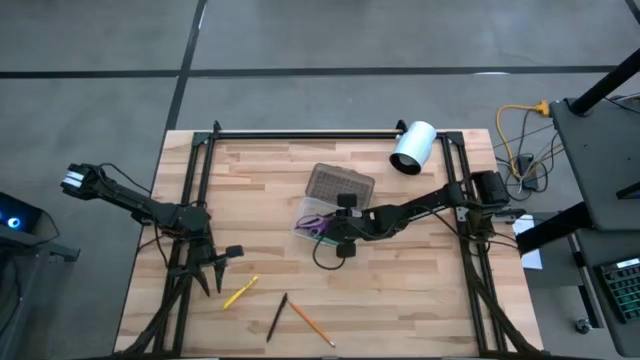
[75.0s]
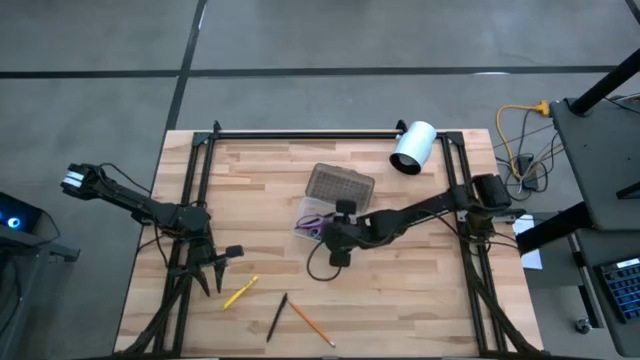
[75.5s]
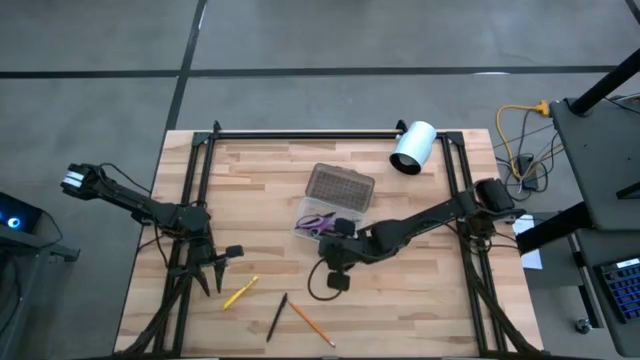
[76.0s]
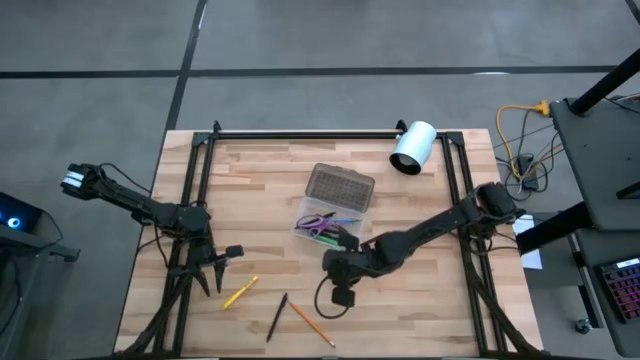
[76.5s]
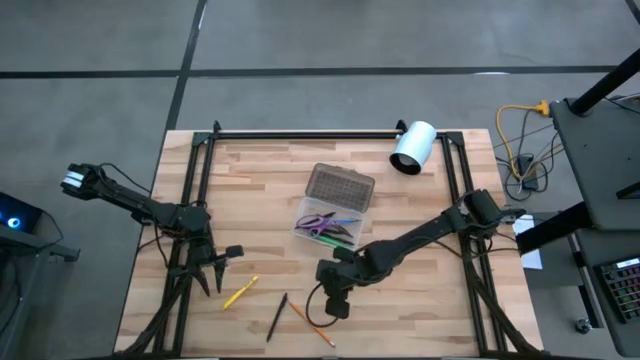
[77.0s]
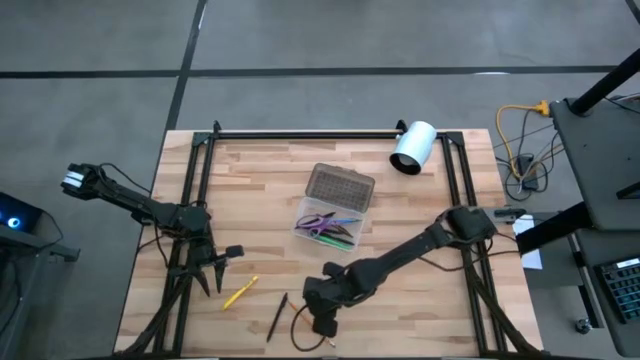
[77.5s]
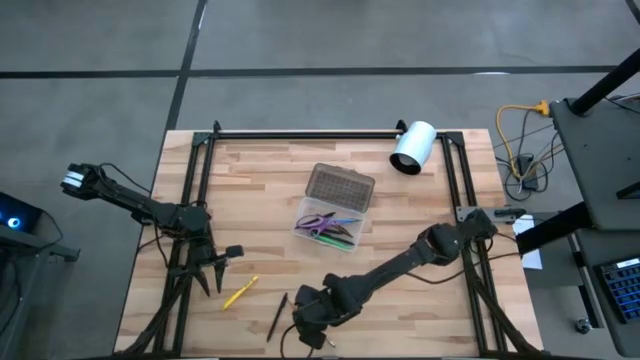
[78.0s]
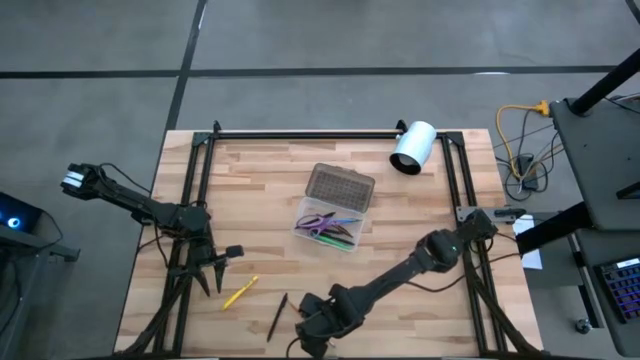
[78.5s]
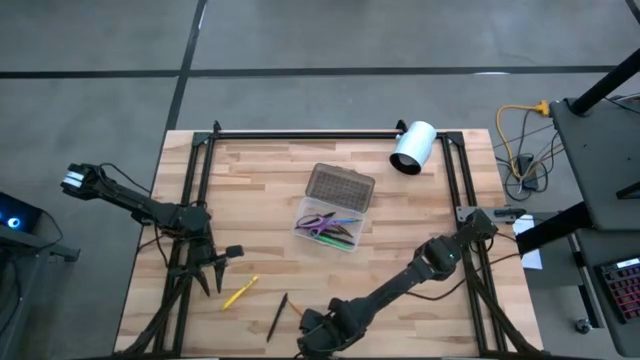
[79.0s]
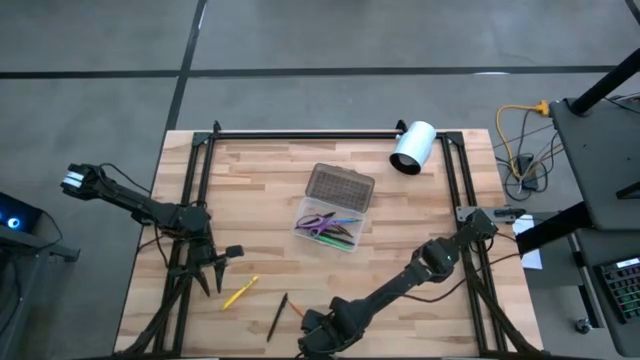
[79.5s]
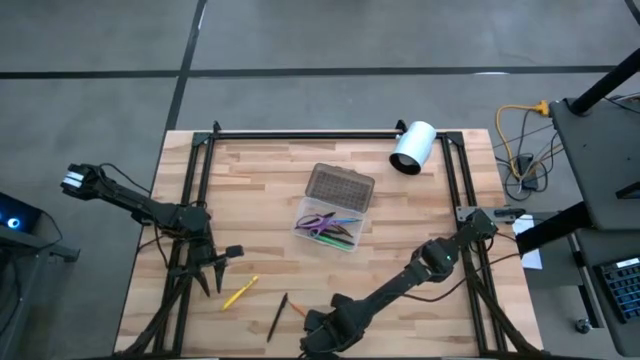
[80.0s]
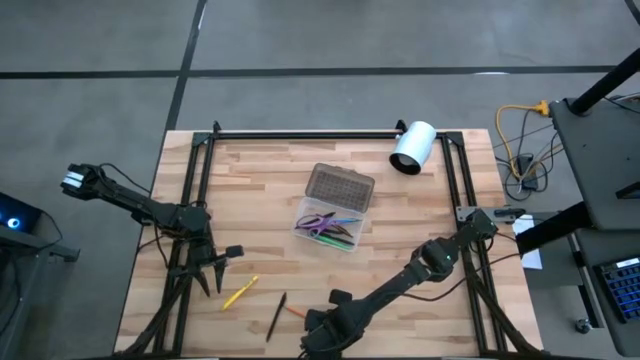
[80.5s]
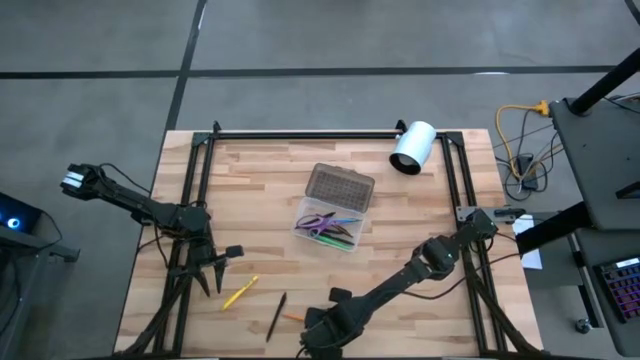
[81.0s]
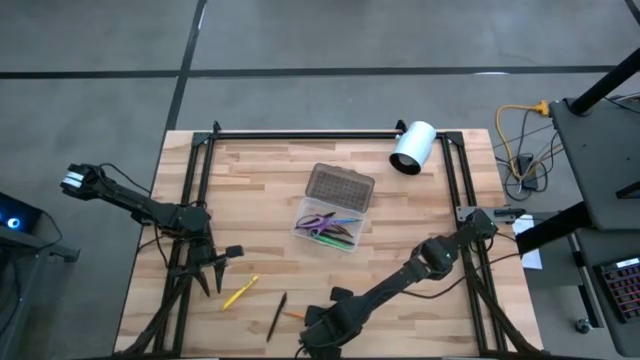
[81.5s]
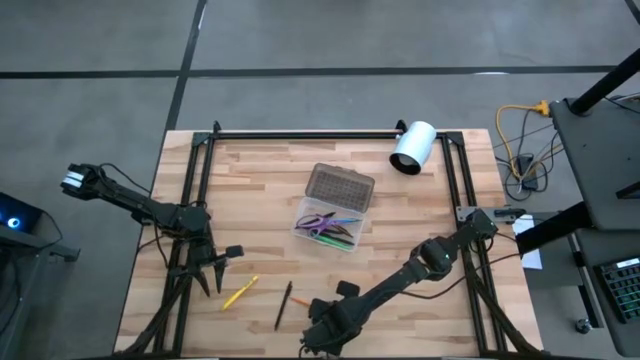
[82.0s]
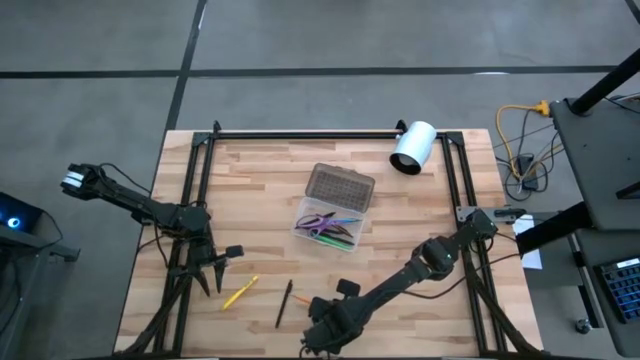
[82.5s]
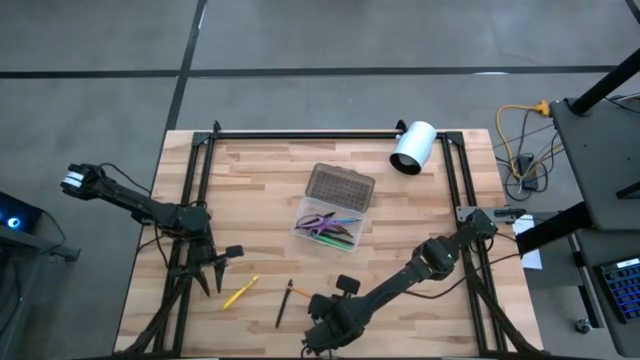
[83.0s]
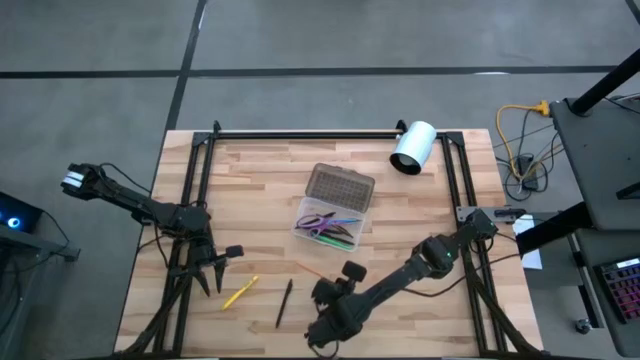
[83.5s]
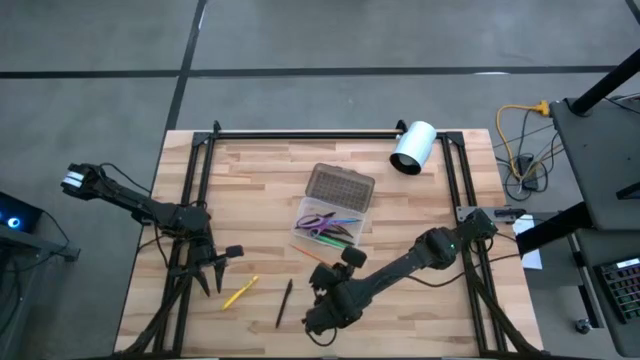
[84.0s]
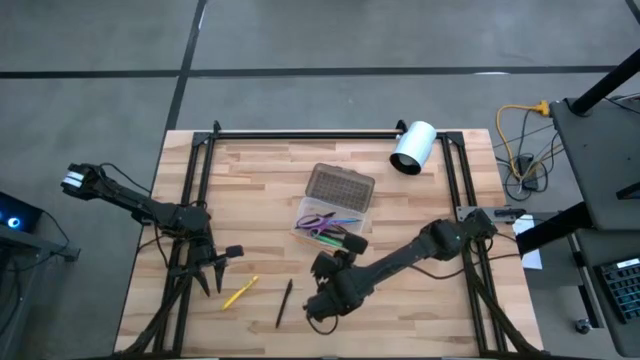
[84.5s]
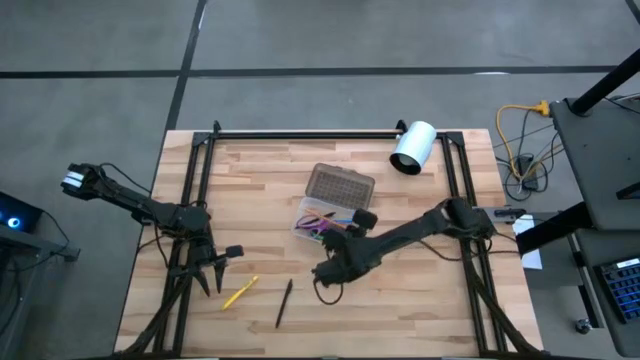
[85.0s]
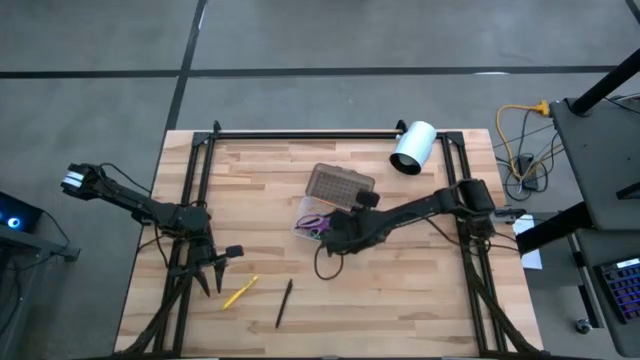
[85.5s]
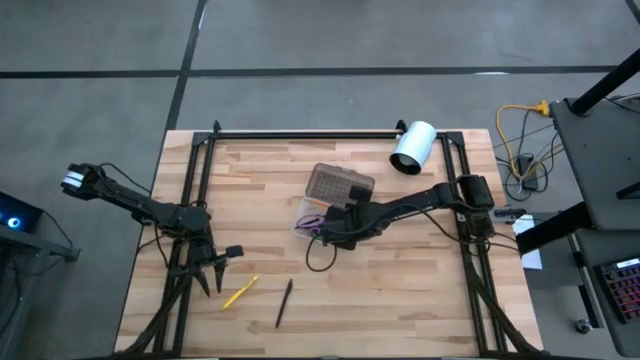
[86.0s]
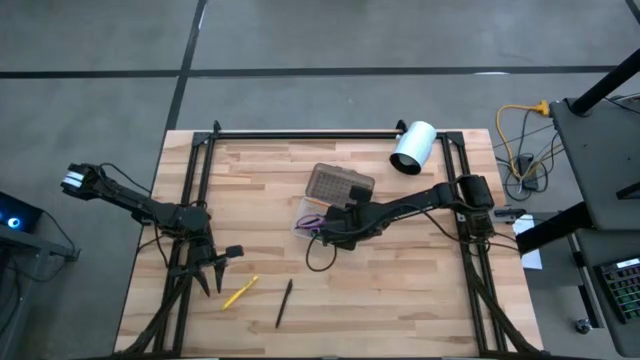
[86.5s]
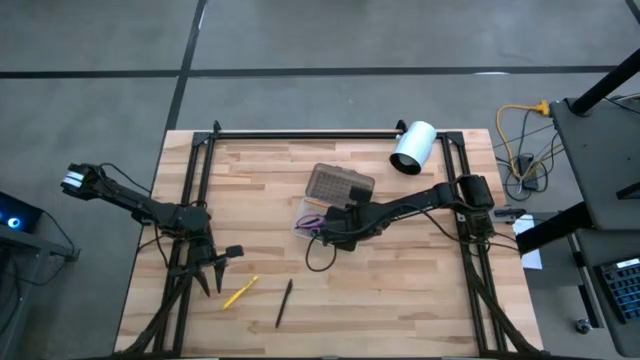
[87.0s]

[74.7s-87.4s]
Task: Pick & place school supplies into a supply box
Put the orange pencil into the supply box

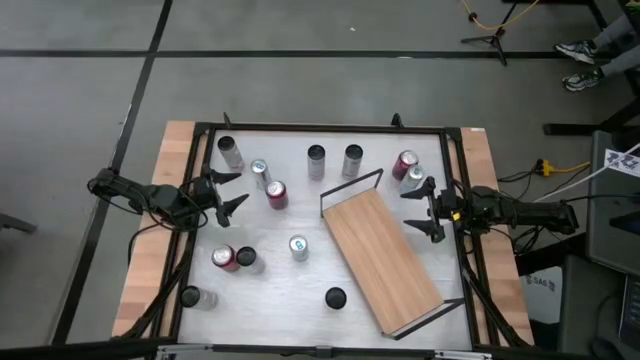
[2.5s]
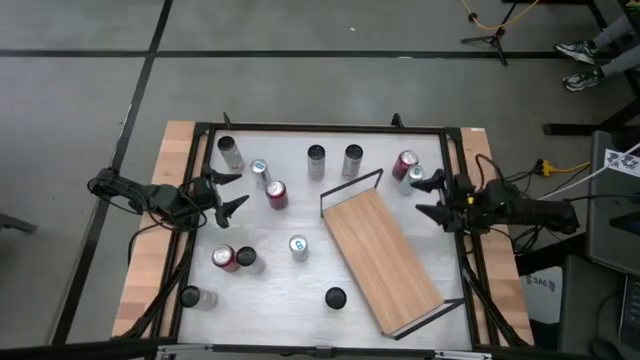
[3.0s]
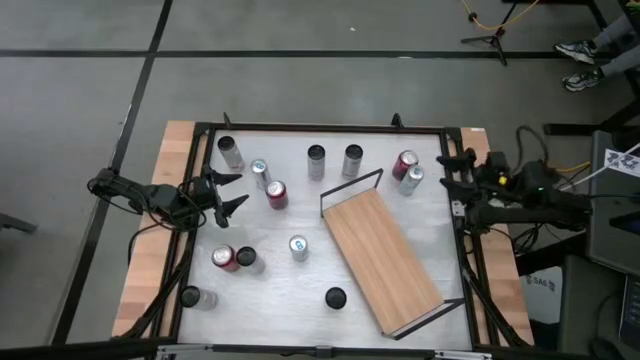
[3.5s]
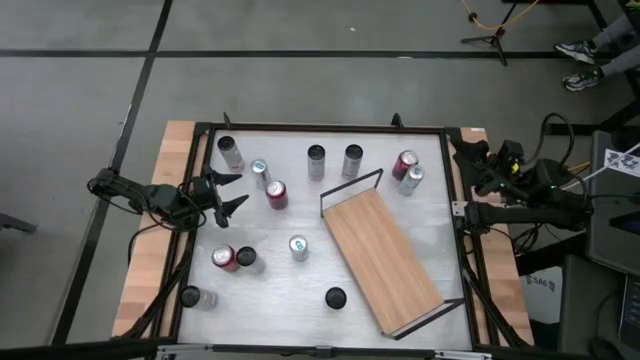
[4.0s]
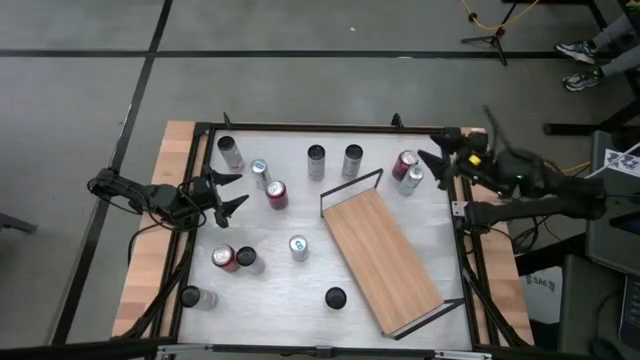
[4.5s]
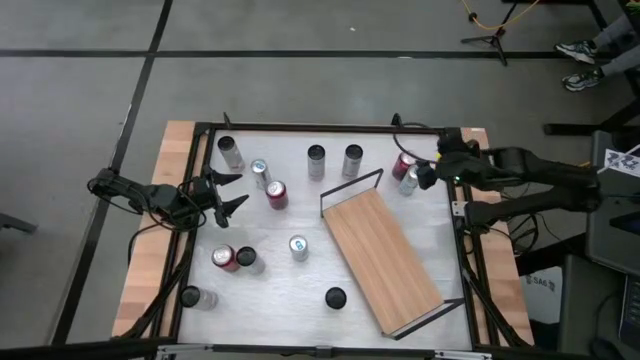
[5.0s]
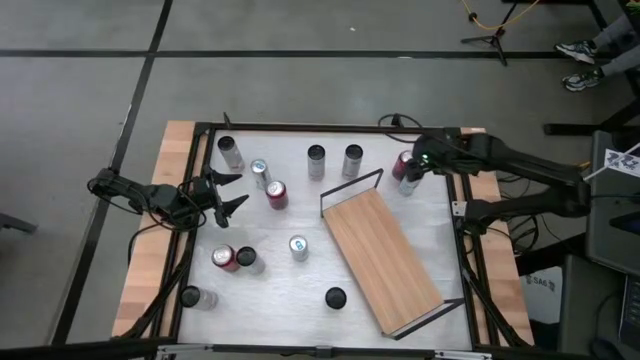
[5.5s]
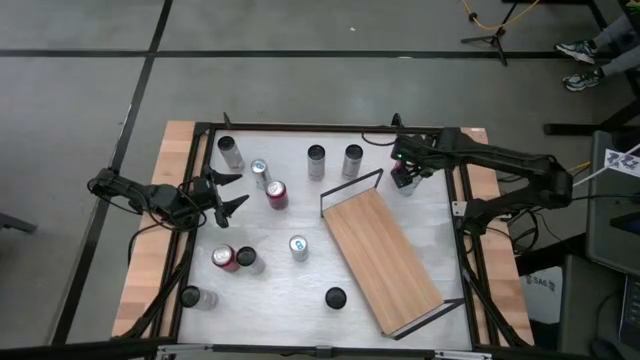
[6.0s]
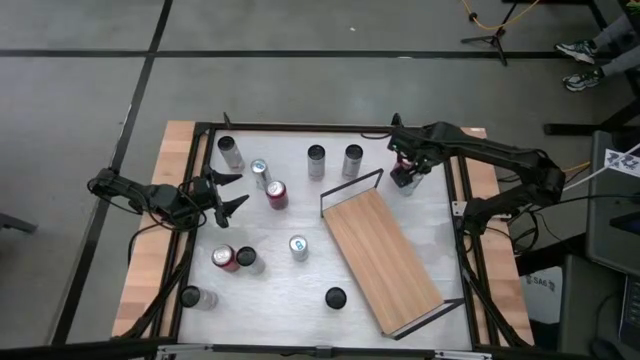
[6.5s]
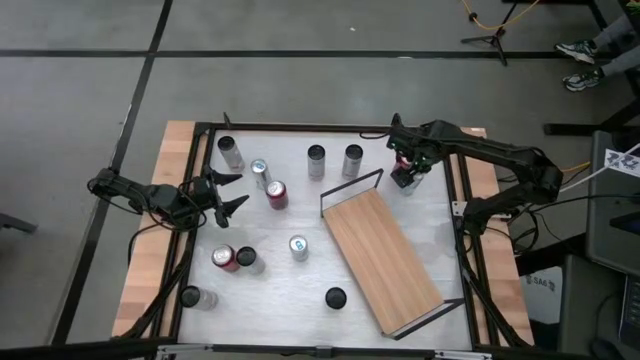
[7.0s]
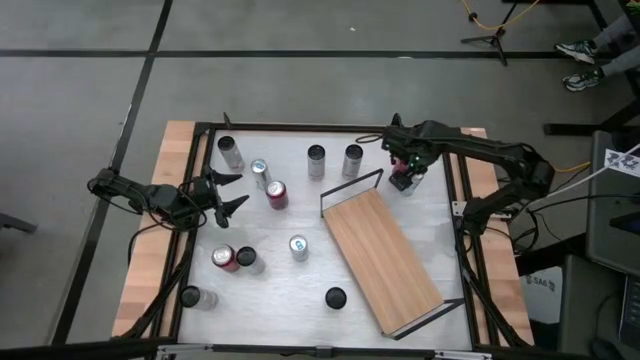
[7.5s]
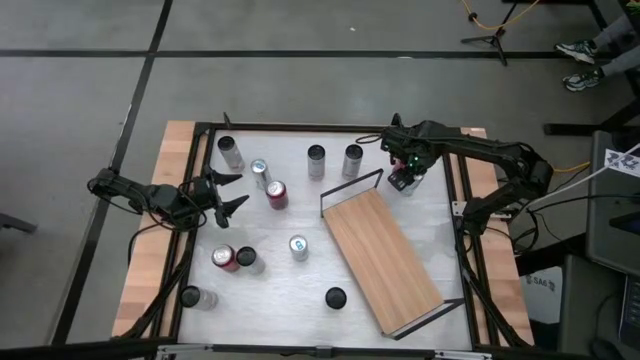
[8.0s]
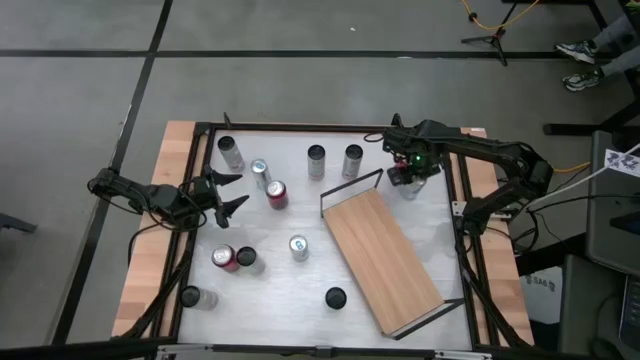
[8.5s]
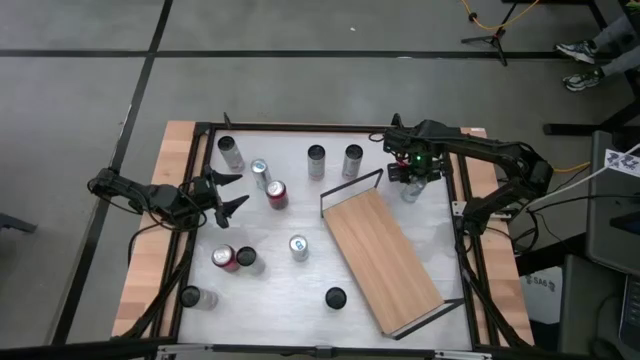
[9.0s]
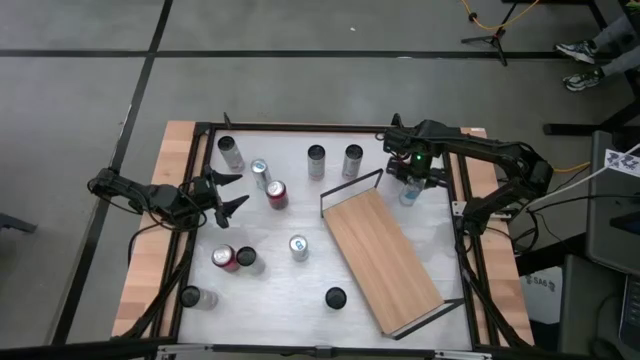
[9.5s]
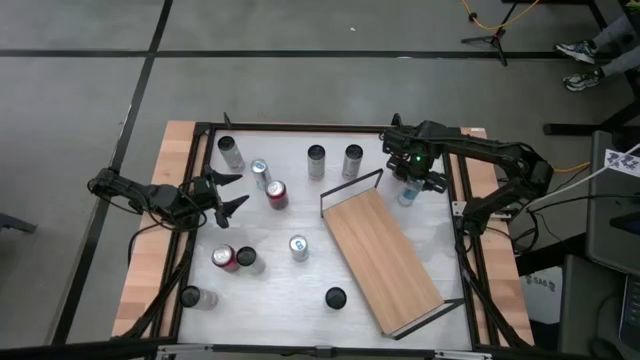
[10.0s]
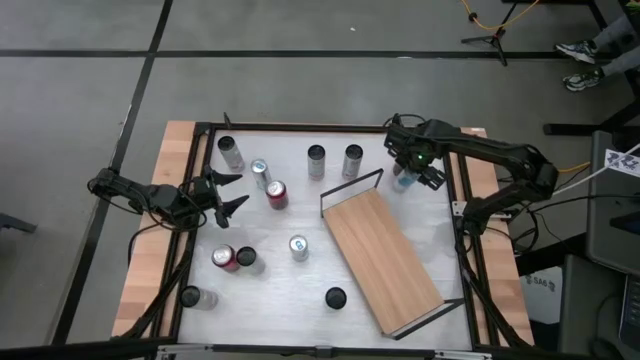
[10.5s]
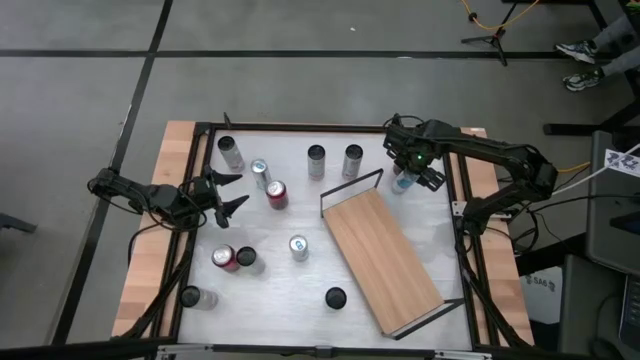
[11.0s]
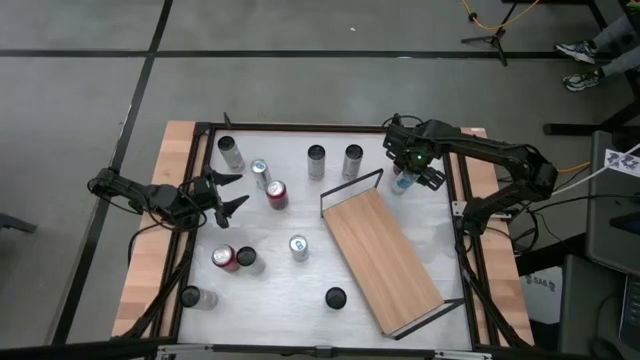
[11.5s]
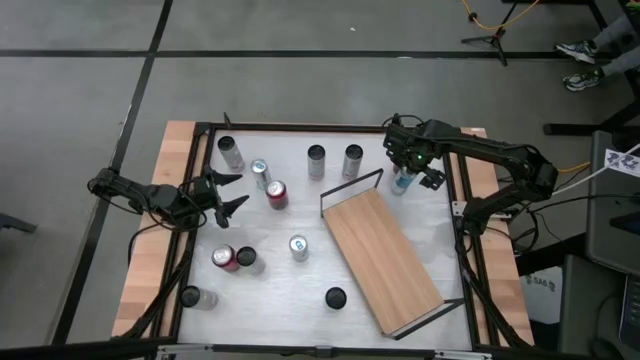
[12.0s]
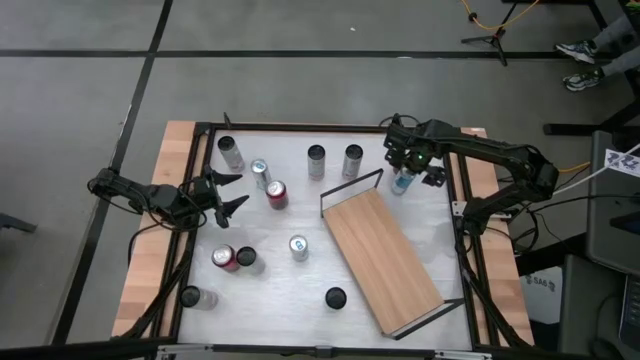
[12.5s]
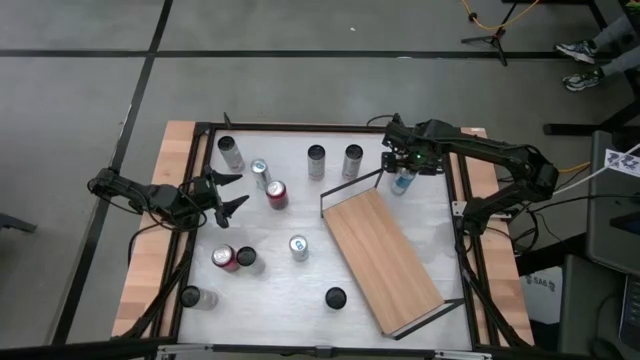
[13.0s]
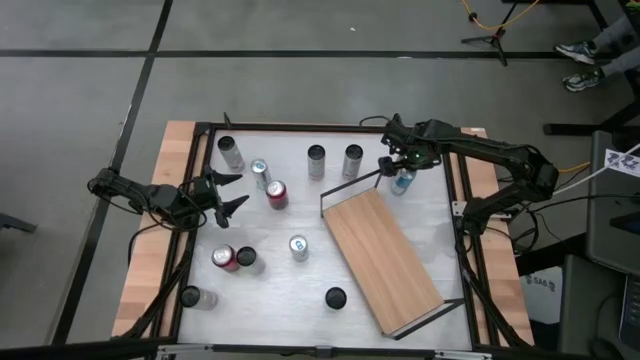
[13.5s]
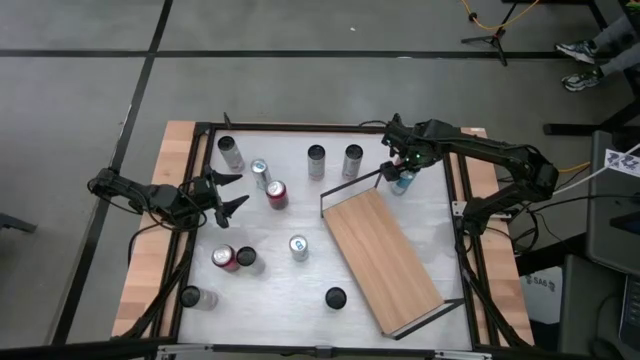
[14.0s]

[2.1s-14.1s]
Task: Place canned beverage on shelf
Put the blue soda can on the shelf
